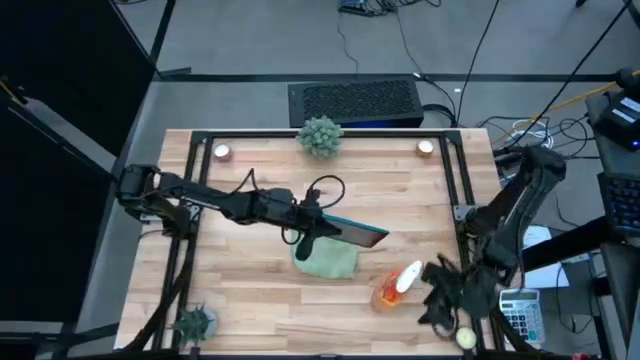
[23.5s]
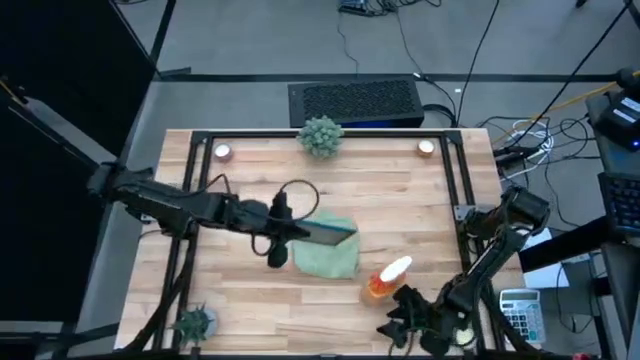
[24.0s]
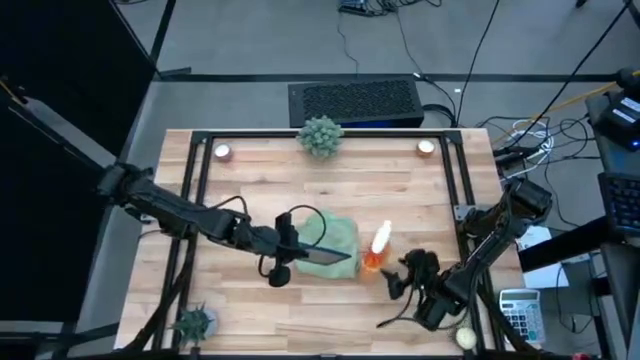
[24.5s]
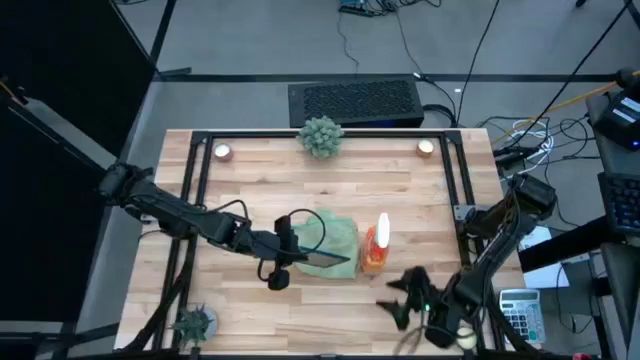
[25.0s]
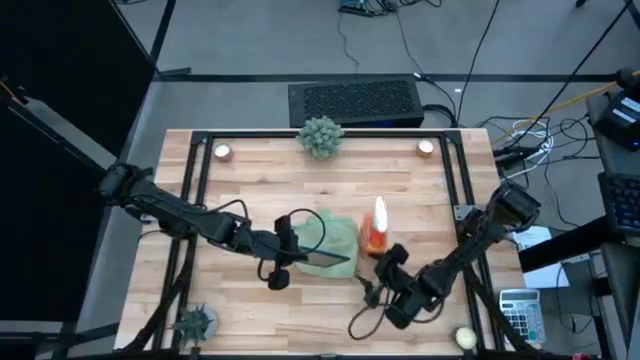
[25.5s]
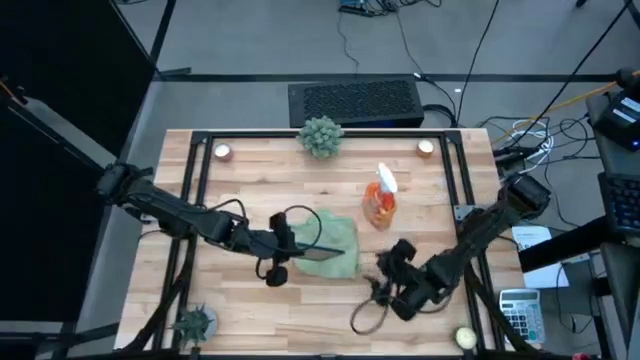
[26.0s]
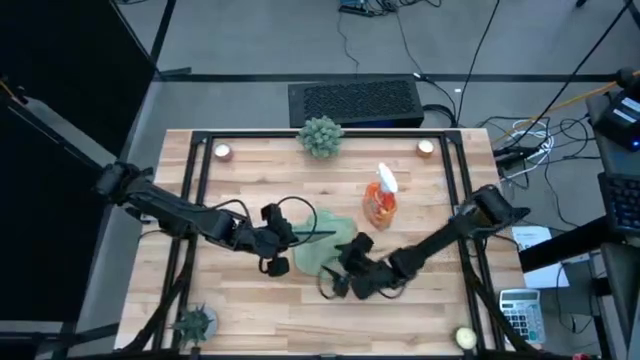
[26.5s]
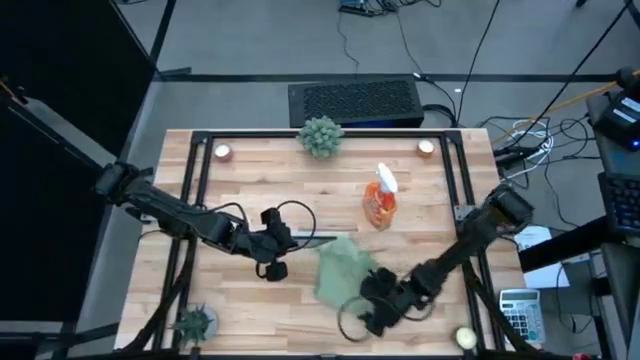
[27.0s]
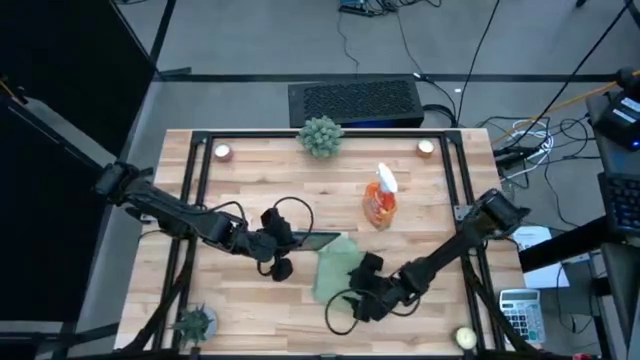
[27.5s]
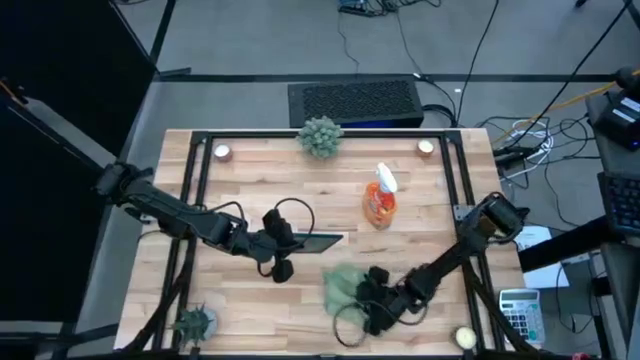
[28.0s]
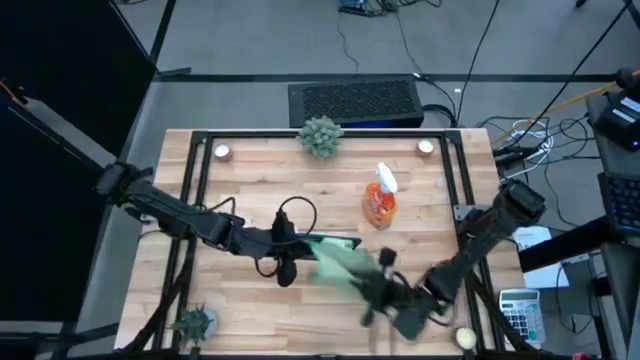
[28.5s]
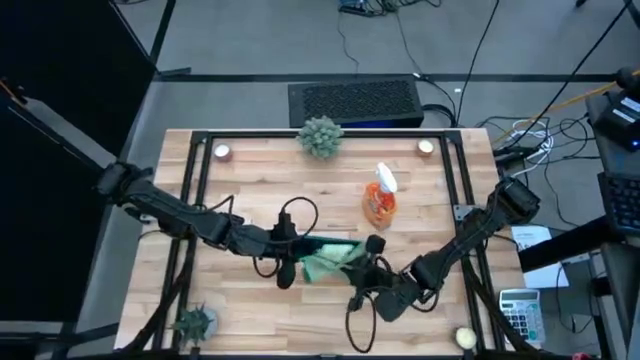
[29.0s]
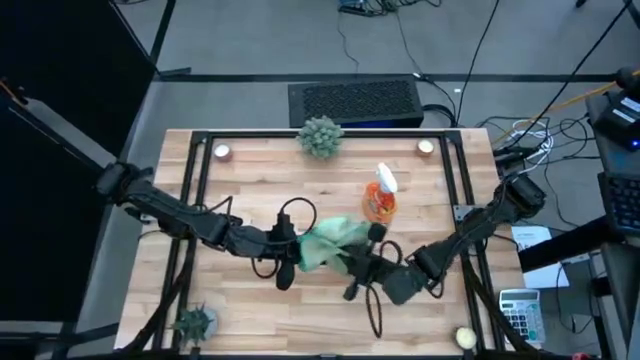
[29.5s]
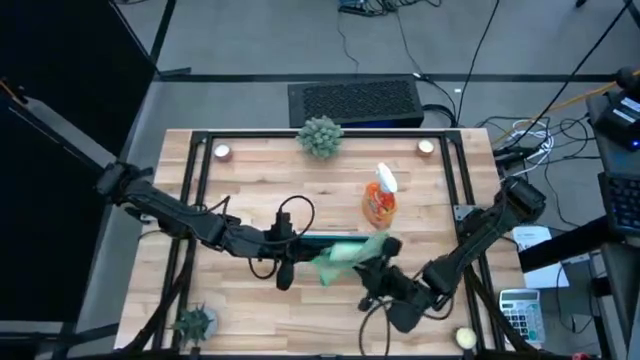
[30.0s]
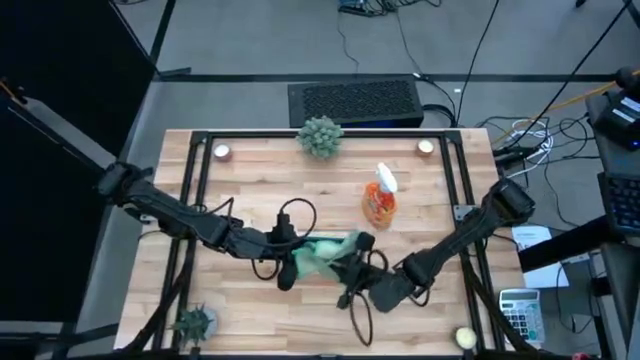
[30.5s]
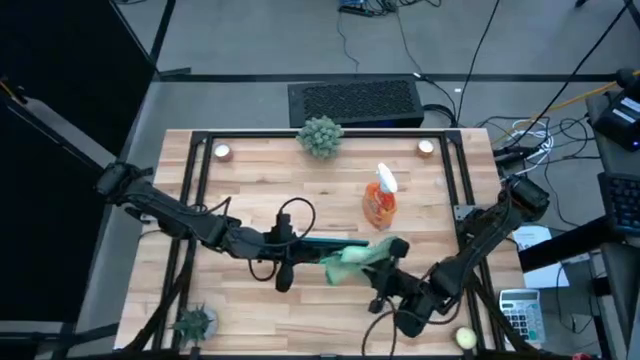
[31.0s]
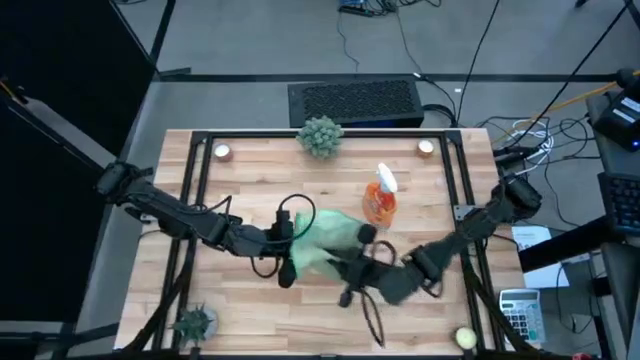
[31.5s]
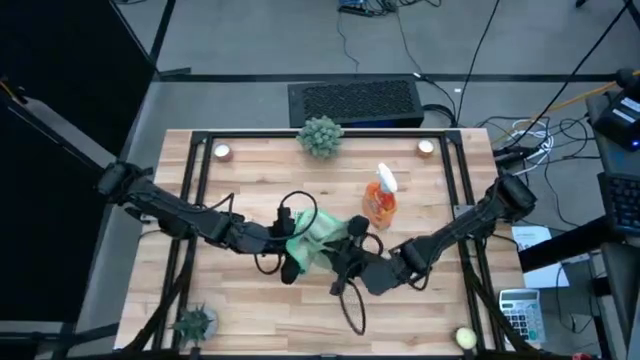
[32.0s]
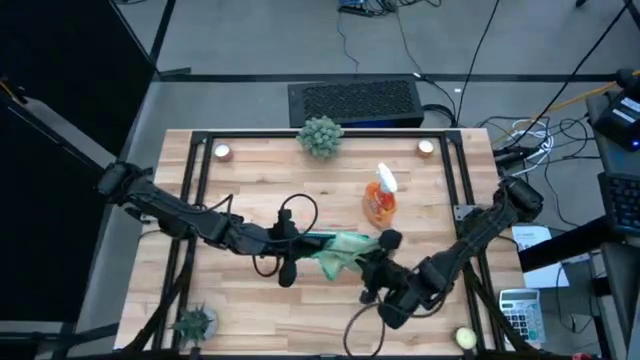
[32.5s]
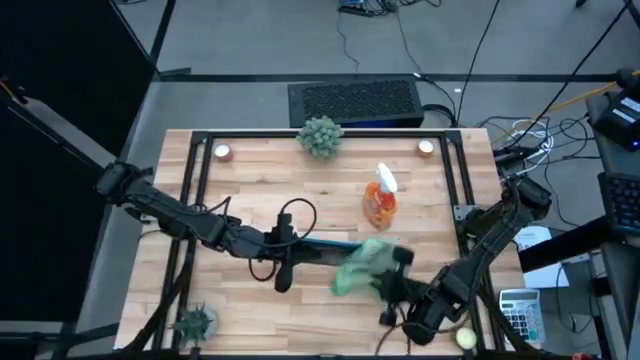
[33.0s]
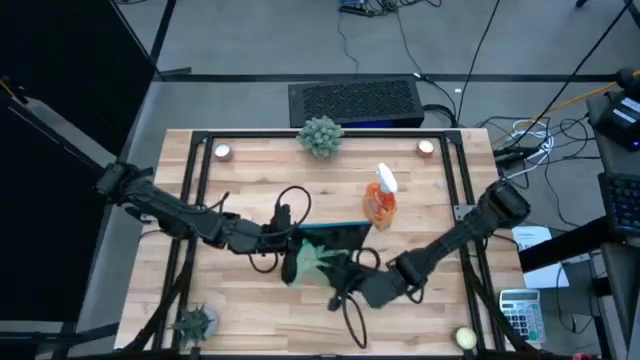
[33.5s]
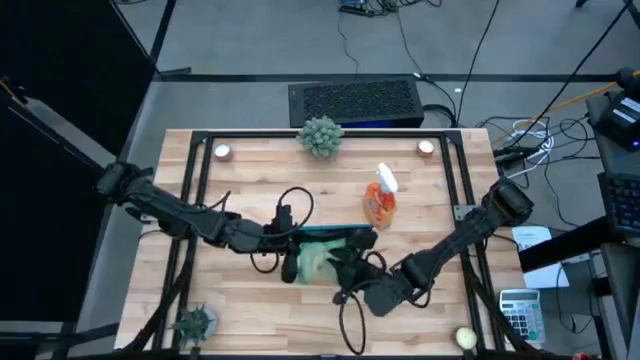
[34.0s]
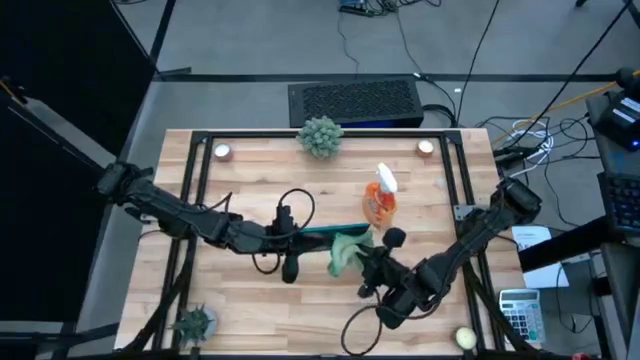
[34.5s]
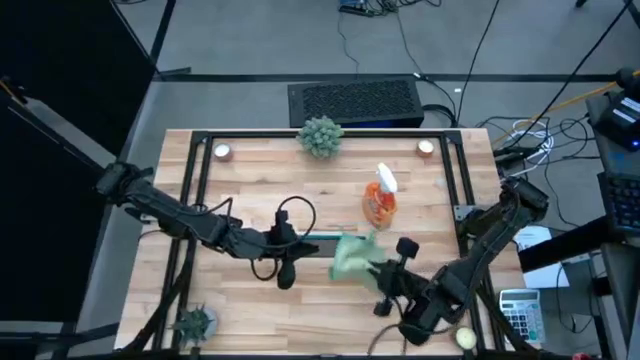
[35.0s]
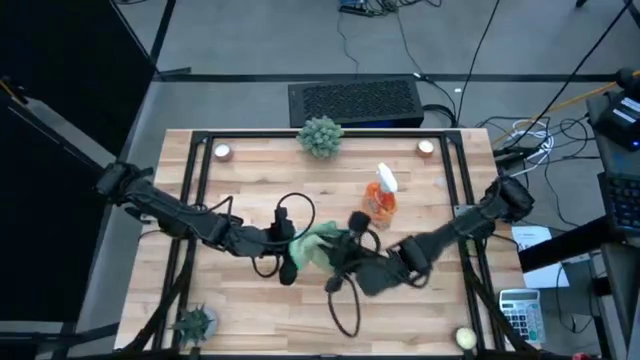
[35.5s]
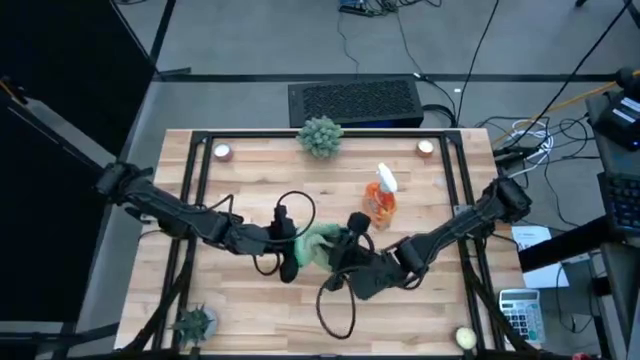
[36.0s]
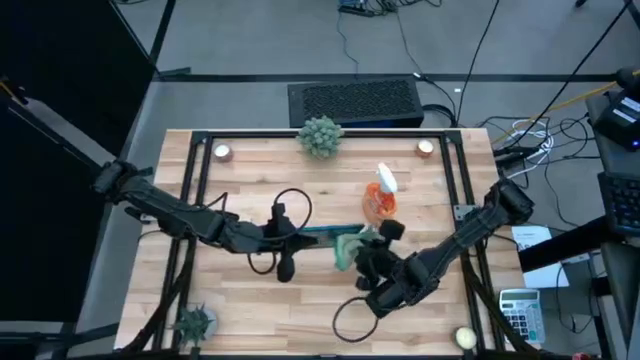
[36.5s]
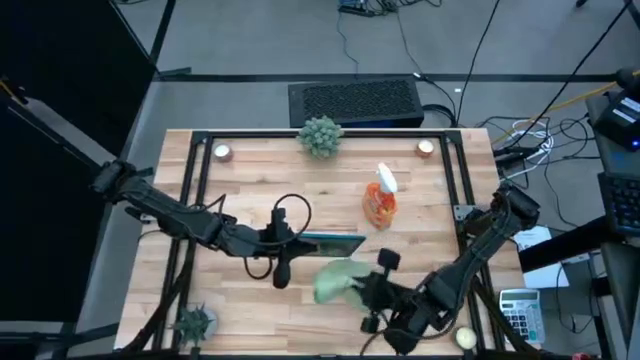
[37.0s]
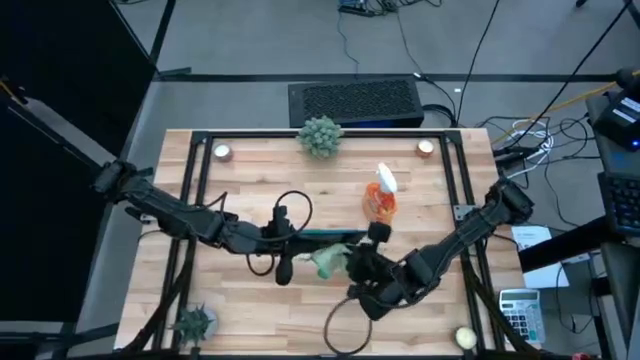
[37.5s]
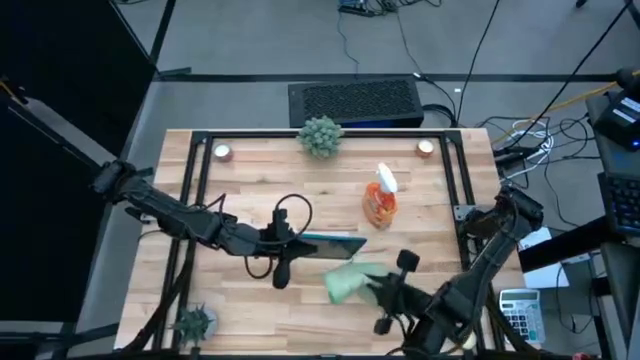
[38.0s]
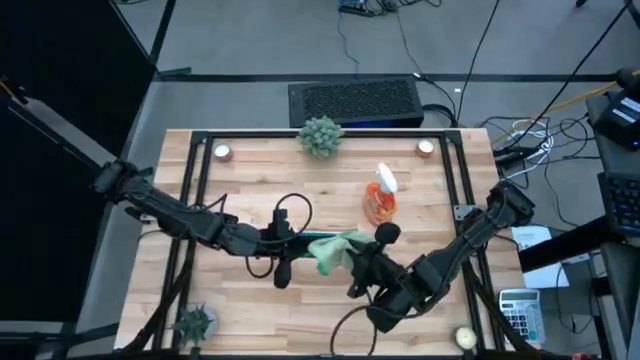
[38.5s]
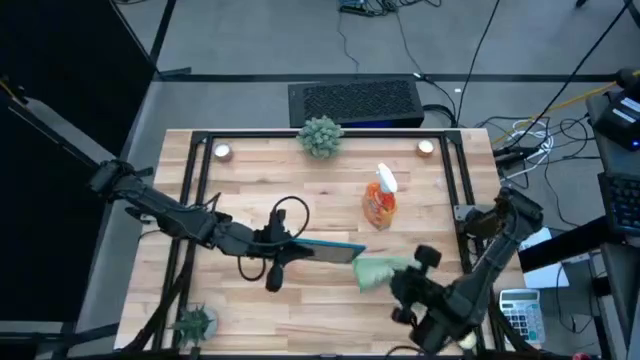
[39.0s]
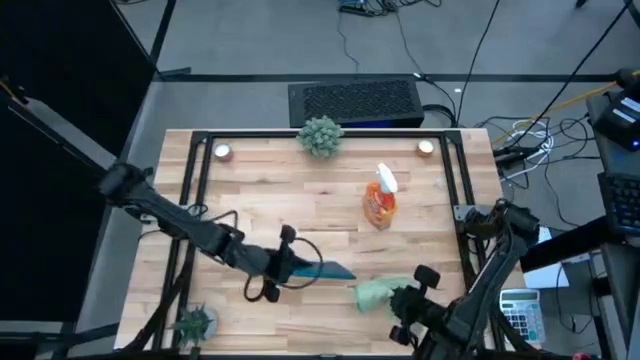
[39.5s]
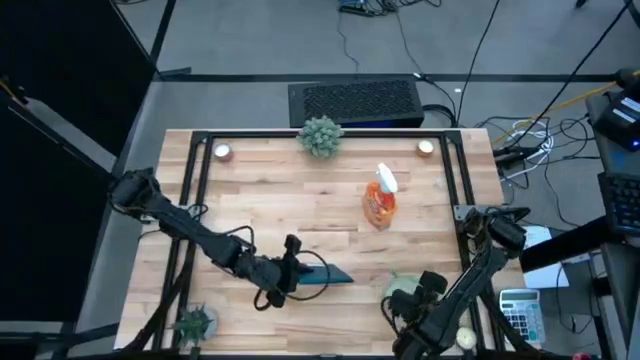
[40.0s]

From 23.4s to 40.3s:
Task: Apply microfiber cloth
Wipe the front of the cellphone with a microfiber cloth
